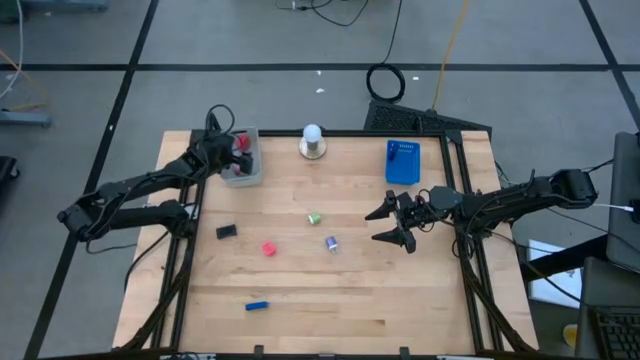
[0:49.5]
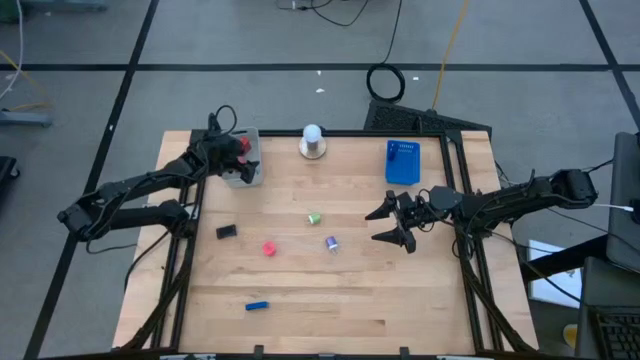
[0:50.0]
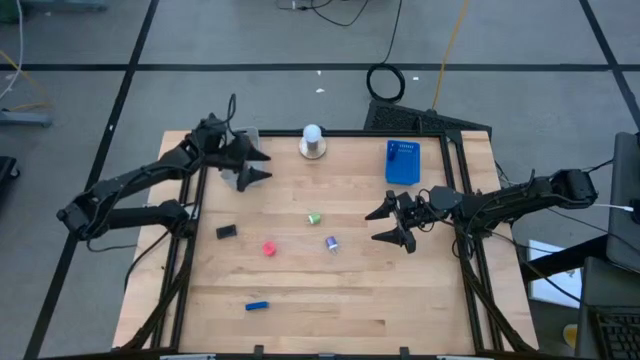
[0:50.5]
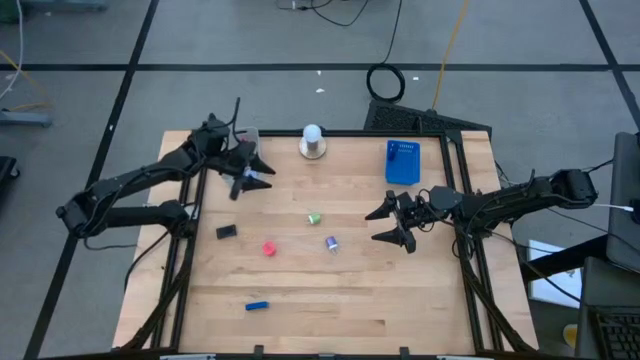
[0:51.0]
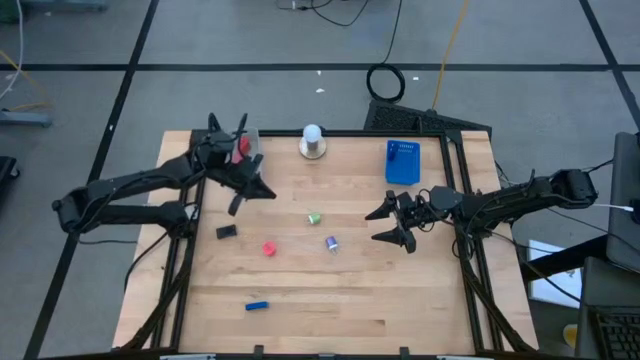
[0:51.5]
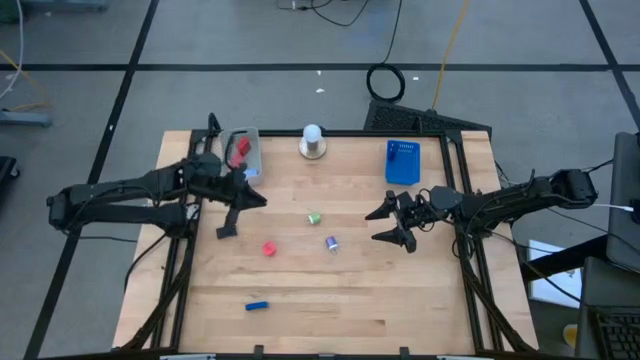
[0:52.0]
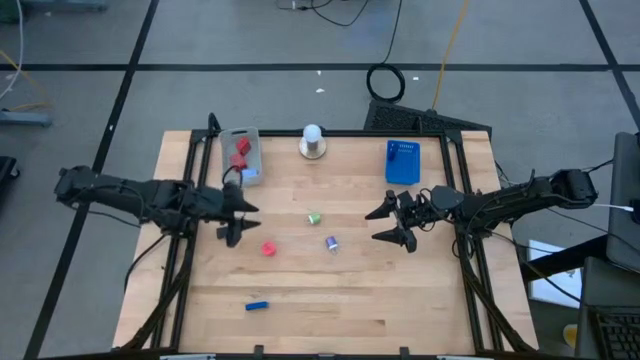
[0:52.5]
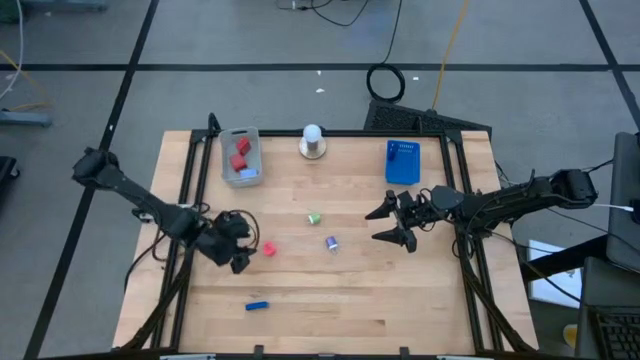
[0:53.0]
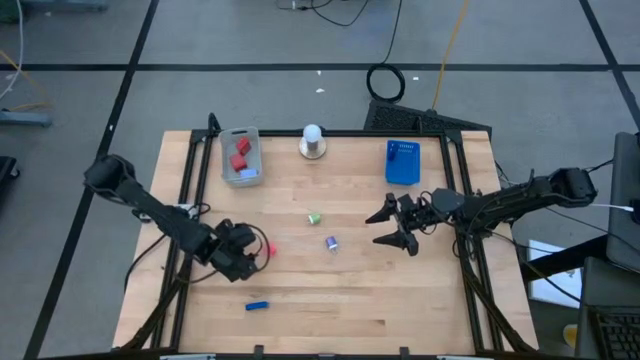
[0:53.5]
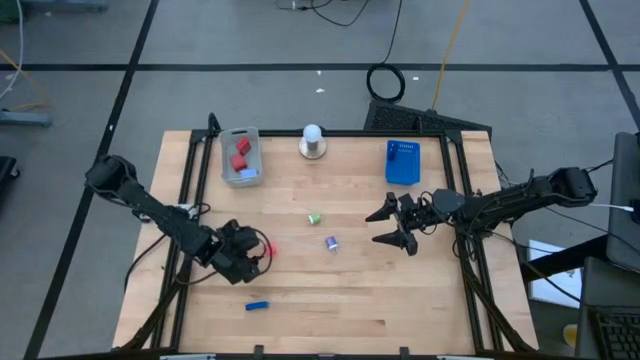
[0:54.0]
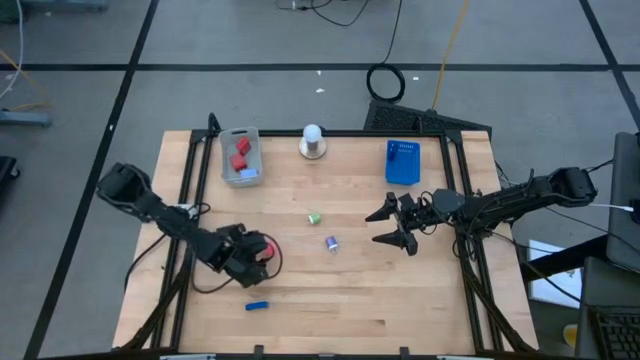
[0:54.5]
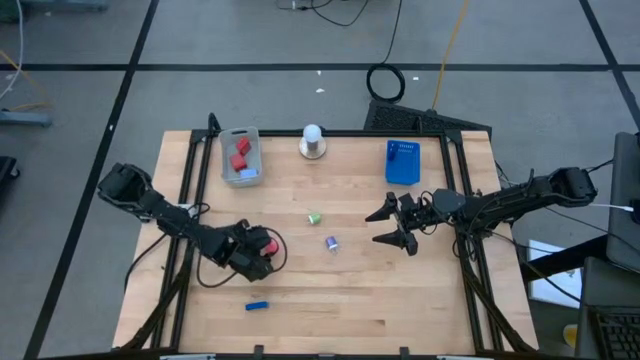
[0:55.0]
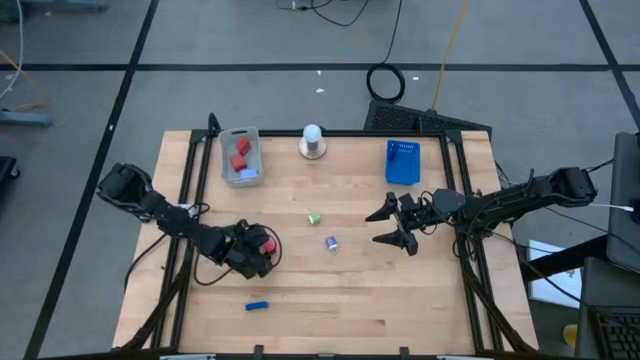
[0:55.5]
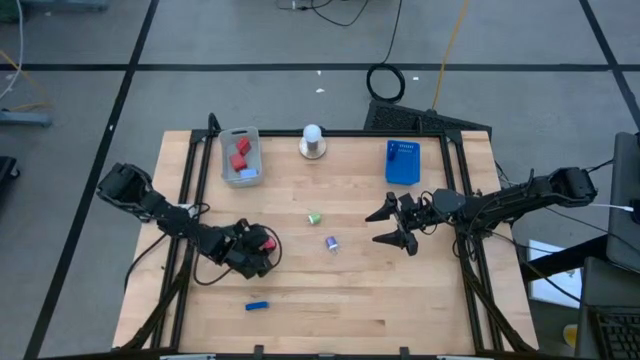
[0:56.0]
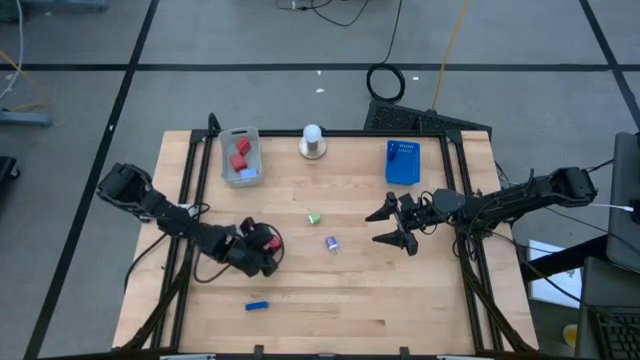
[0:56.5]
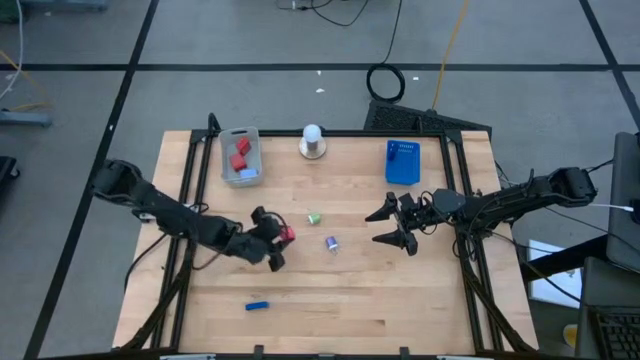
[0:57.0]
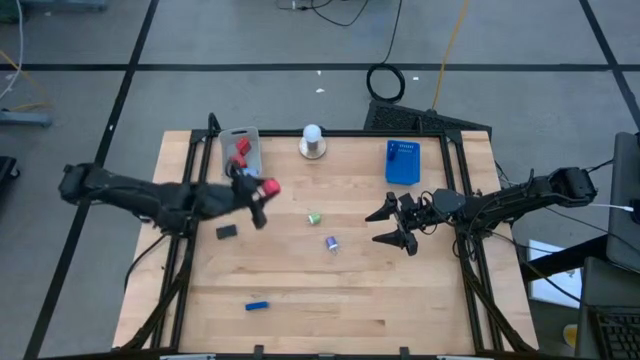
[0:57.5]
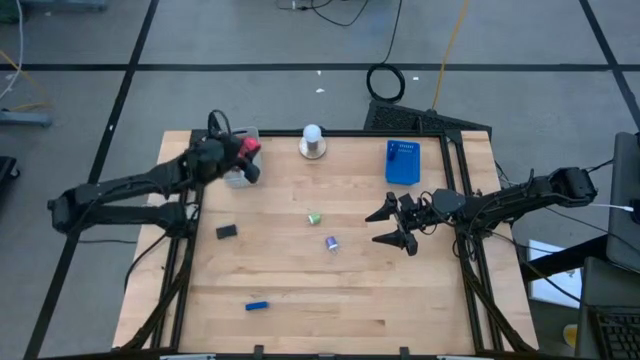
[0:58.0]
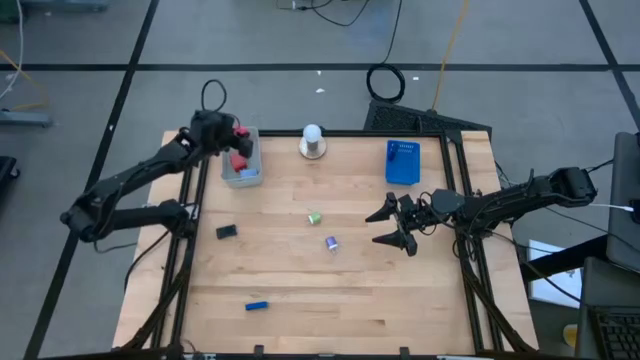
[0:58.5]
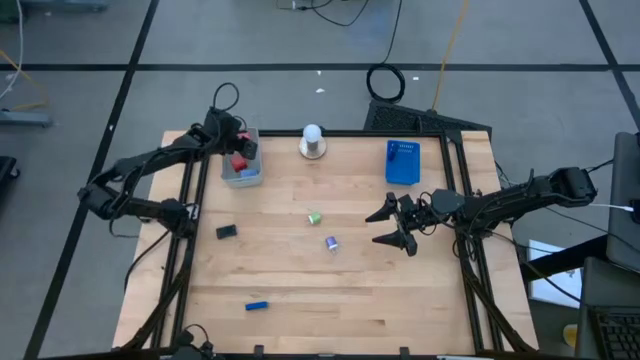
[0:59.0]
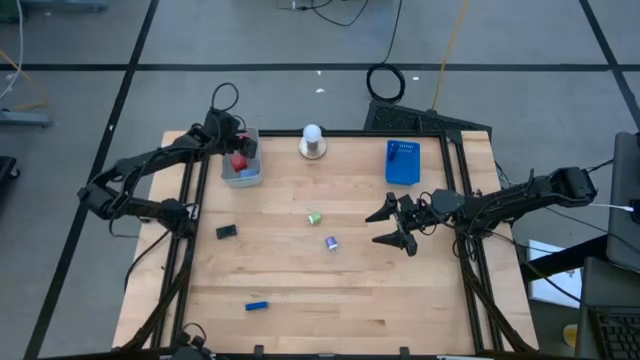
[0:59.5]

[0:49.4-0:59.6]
Task: Pick & Place Office items
Put the pink charger adapter into the gray bin

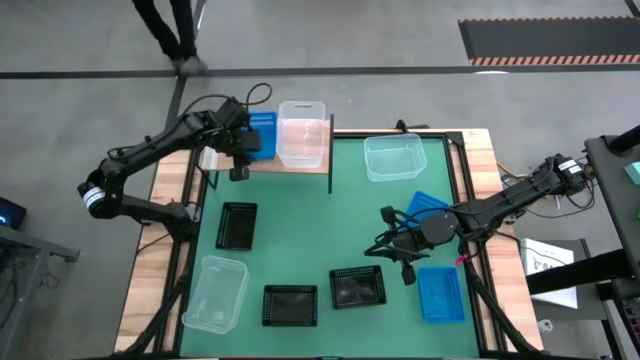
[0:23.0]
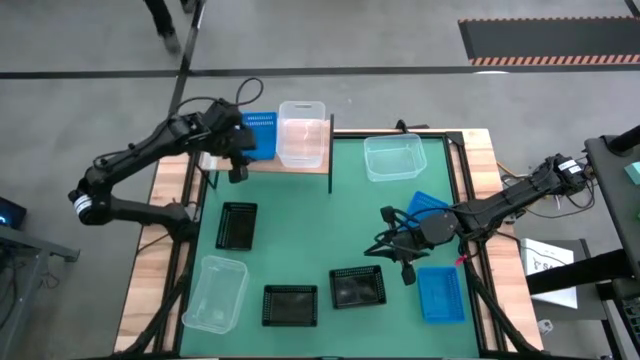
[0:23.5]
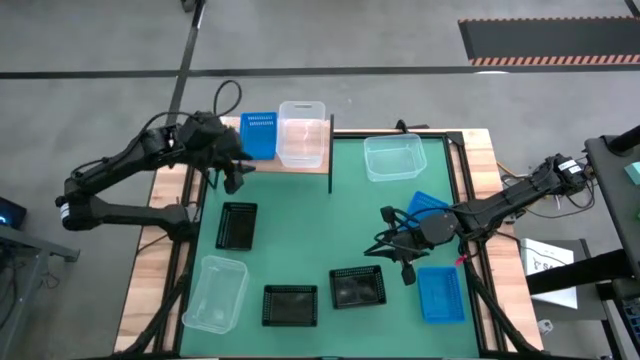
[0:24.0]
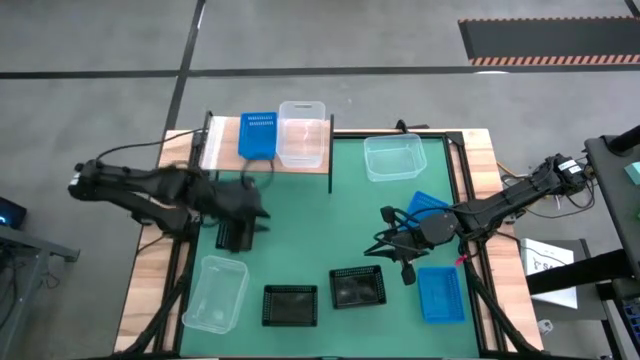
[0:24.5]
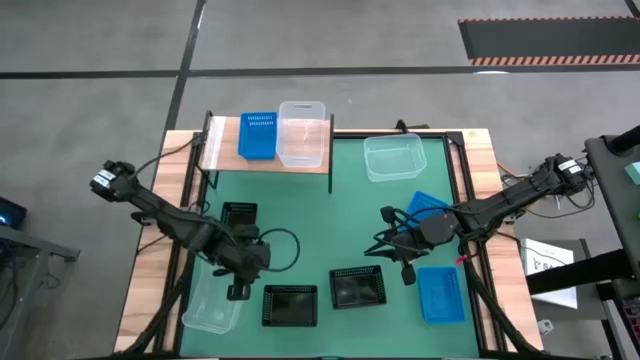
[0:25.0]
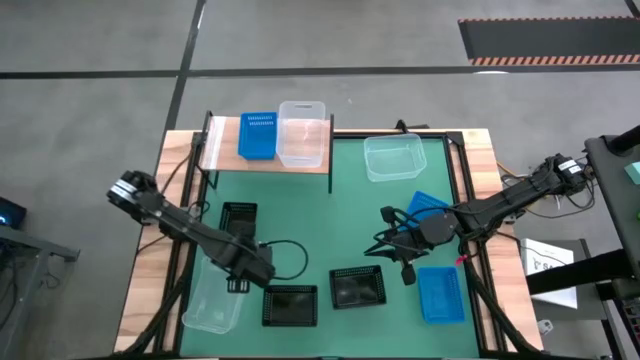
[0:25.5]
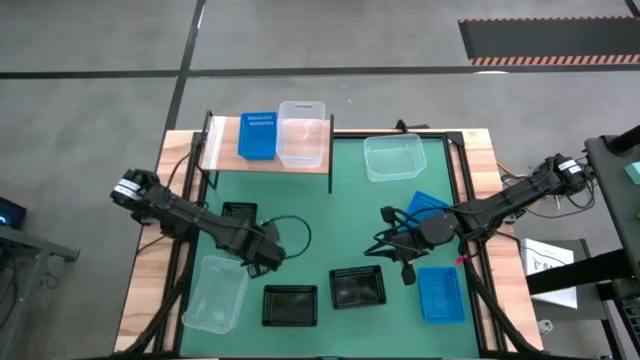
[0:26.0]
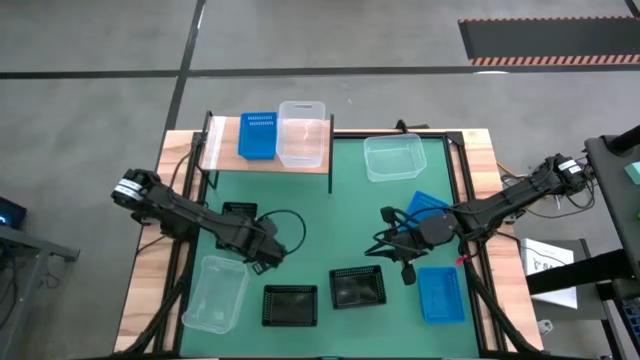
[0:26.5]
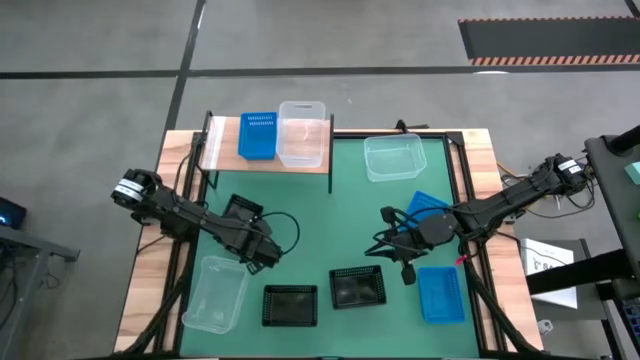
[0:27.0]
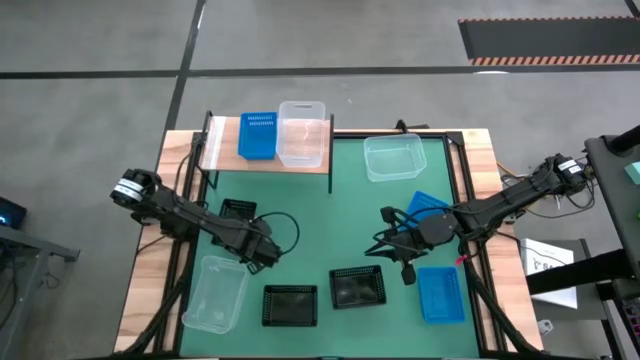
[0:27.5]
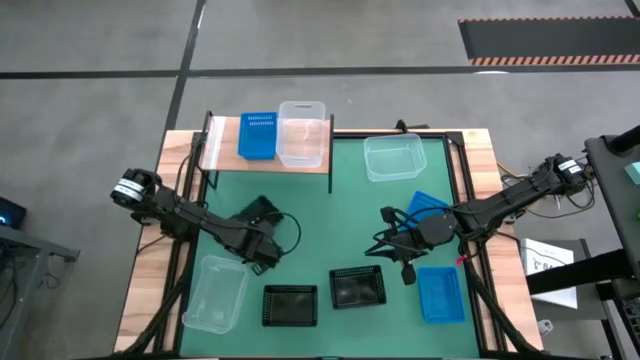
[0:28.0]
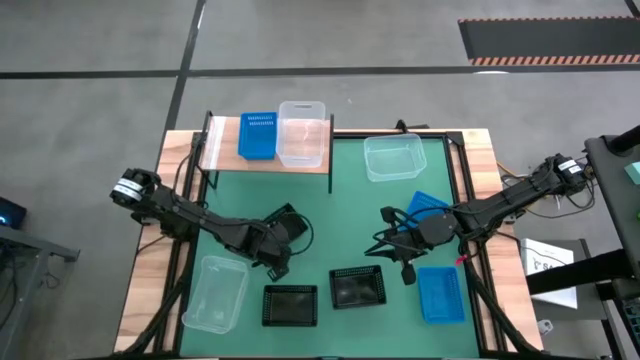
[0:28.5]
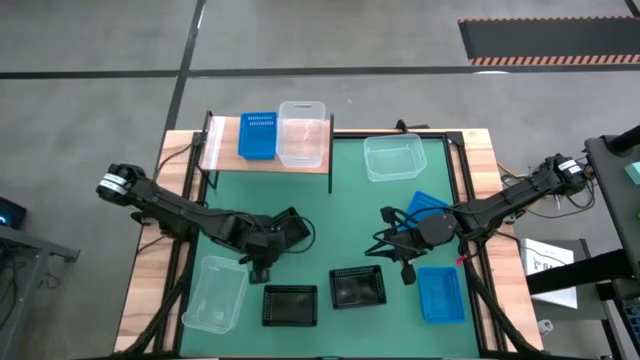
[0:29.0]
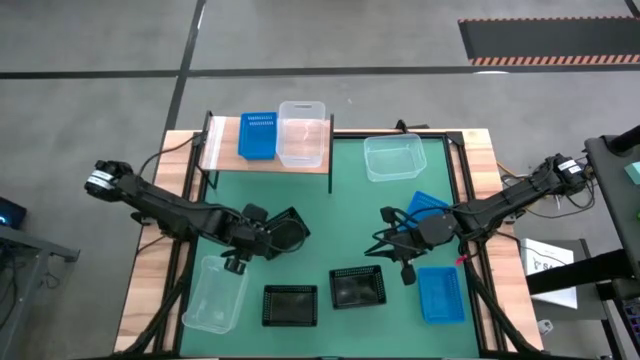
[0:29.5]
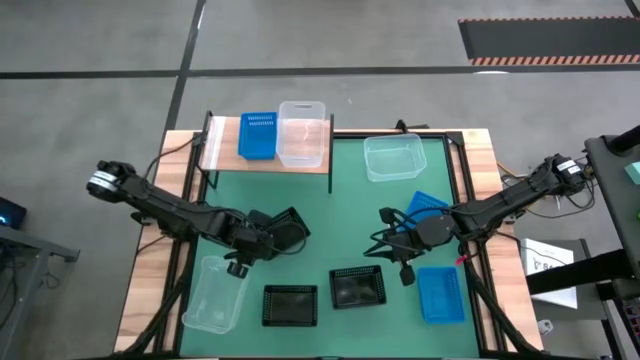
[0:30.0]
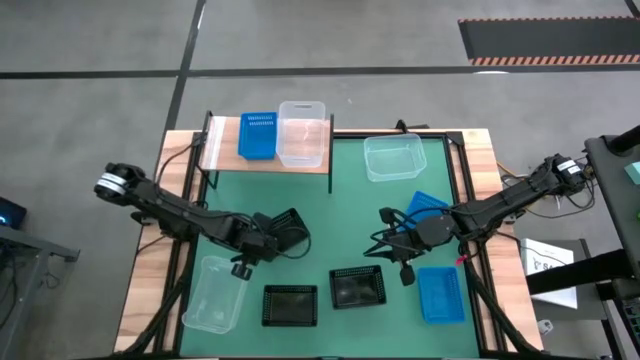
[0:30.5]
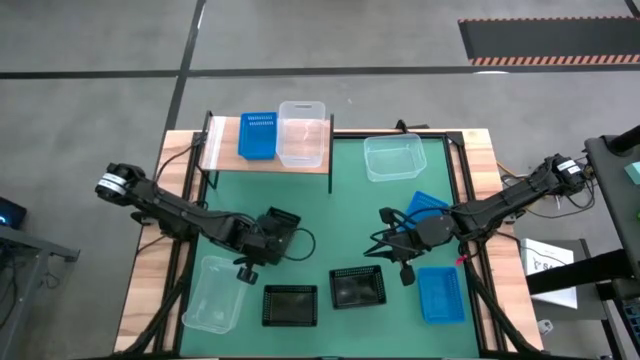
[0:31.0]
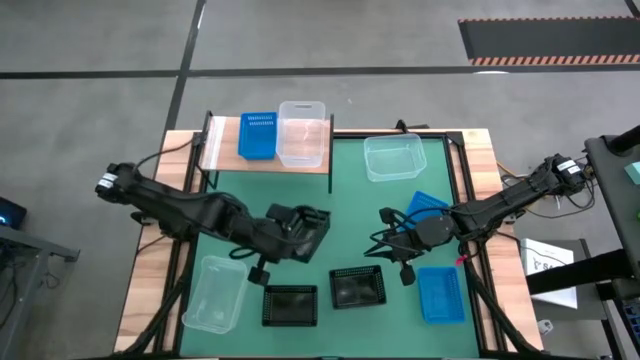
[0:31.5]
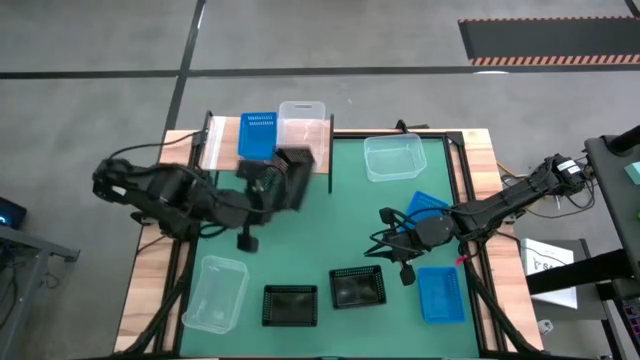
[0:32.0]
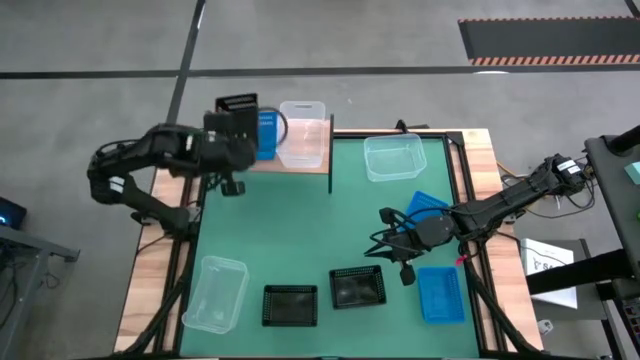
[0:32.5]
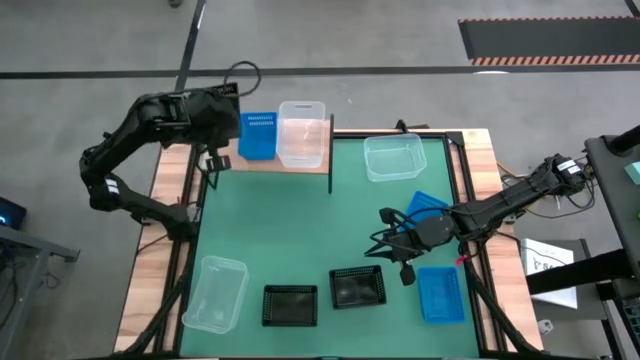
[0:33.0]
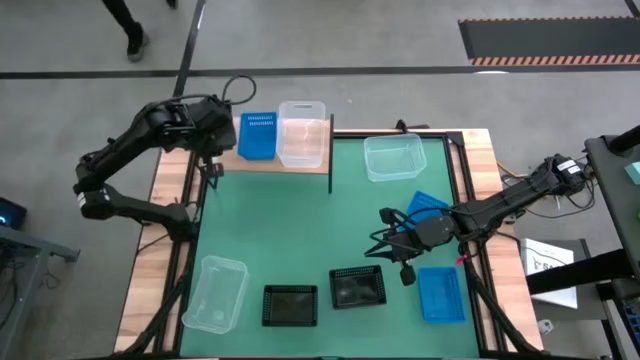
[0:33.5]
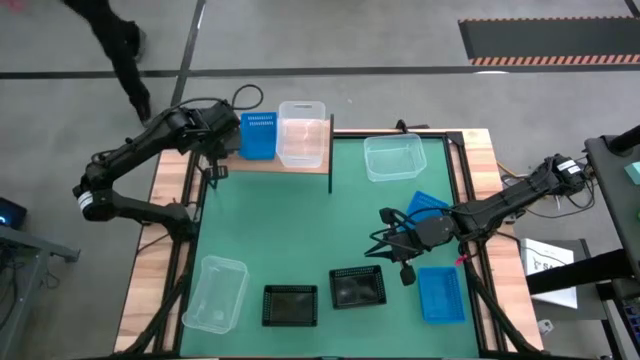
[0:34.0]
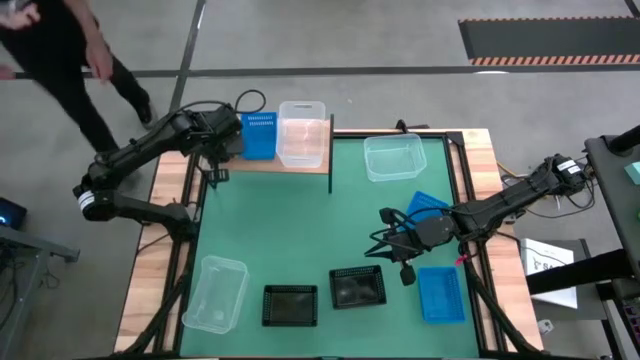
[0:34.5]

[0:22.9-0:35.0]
Task: Stack baskets on shelf by color
Put the top black bin on the shelf
